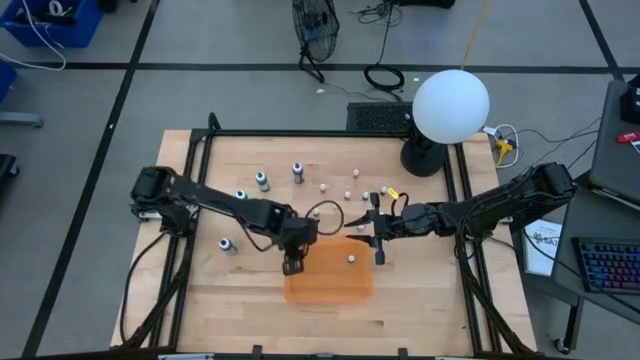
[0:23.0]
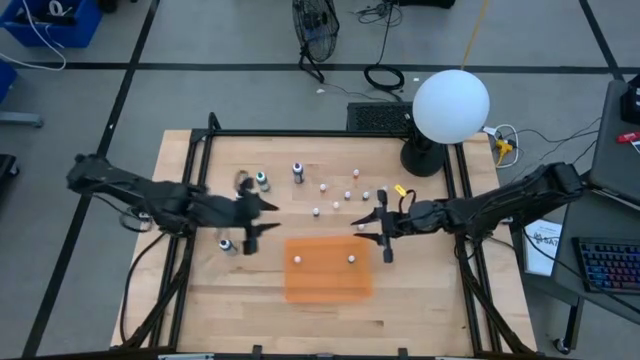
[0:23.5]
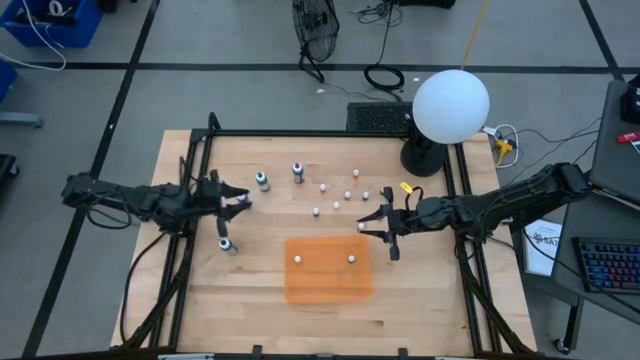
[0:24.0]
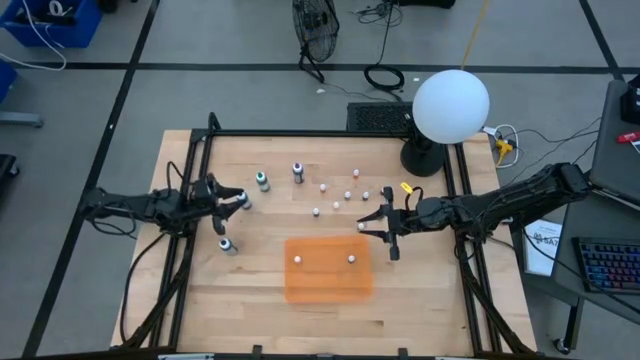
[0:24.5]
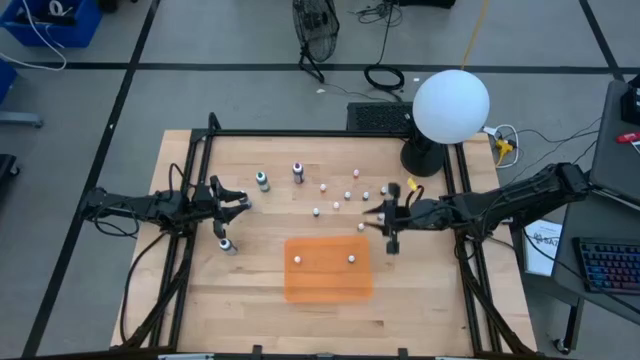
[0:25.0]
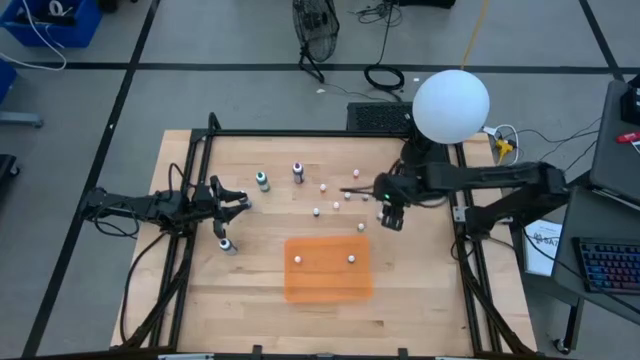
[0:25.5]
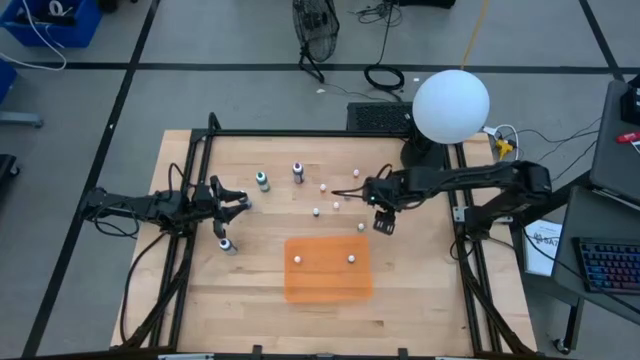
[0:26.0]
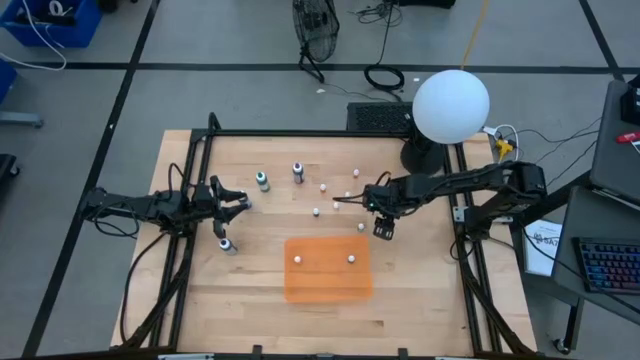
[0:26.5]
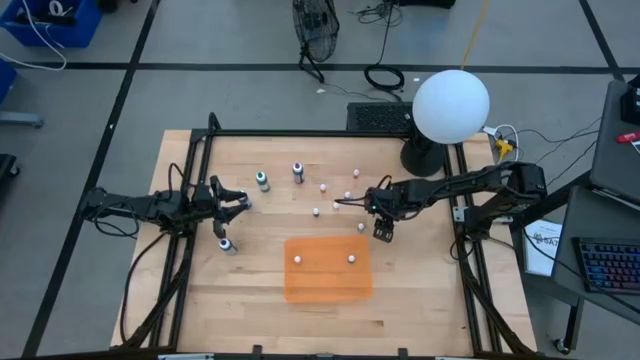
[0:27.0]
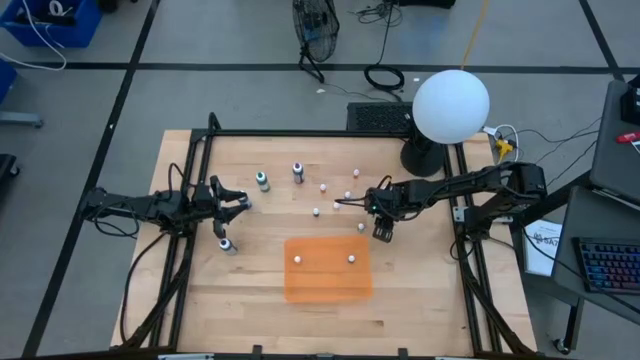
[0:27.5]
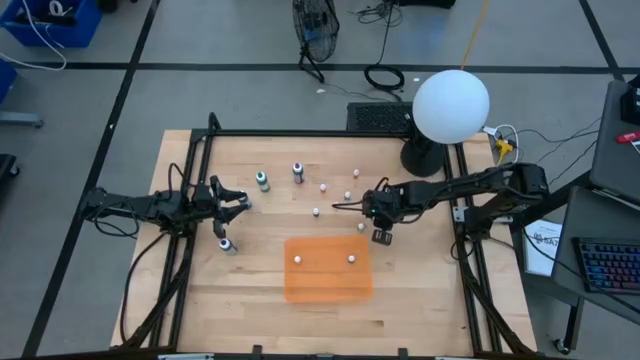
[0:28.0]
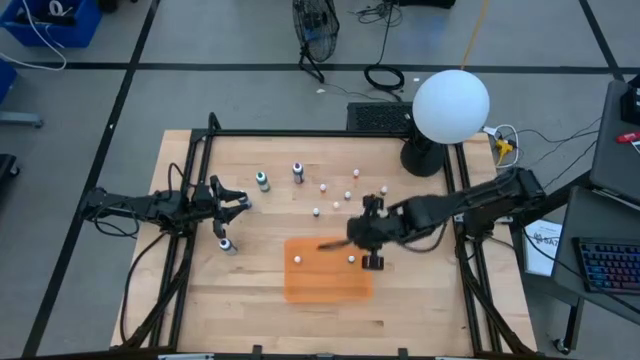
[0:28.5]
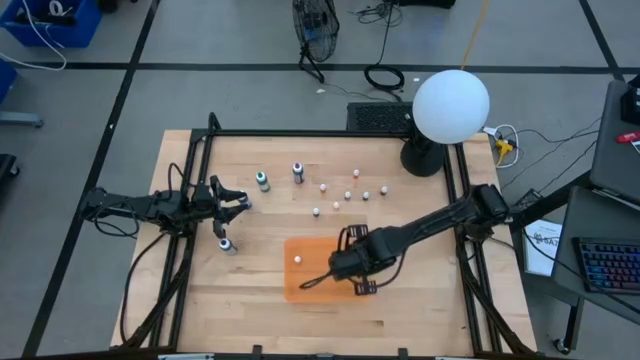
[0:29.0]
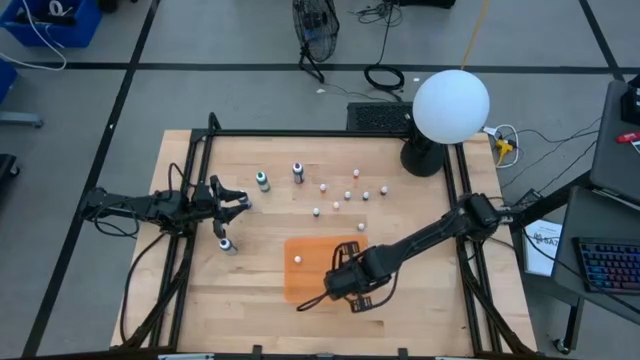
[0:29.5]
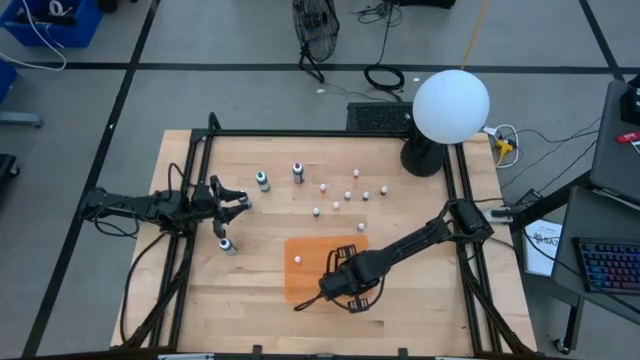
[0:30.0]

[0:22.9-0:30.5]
Task: Pick & Place food coloring
Put the small black food coloring bottle into the orange bin

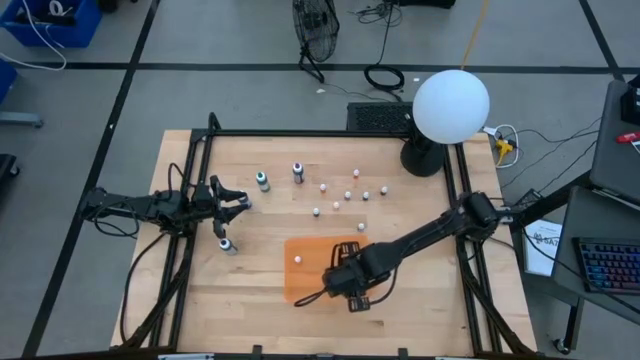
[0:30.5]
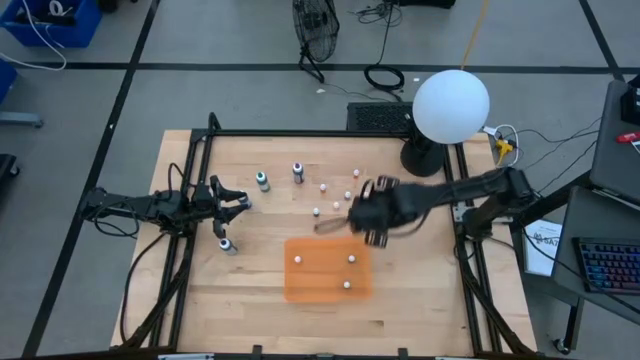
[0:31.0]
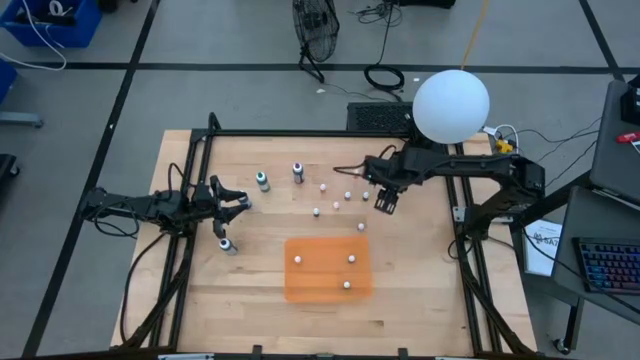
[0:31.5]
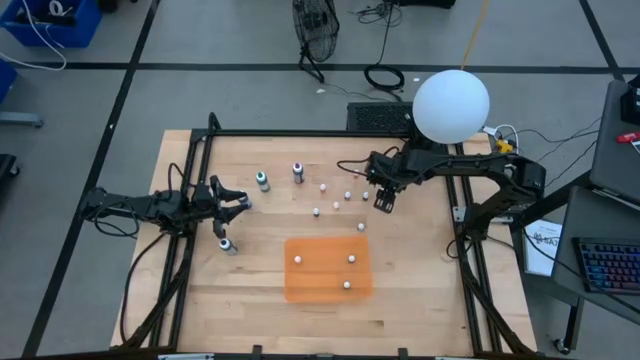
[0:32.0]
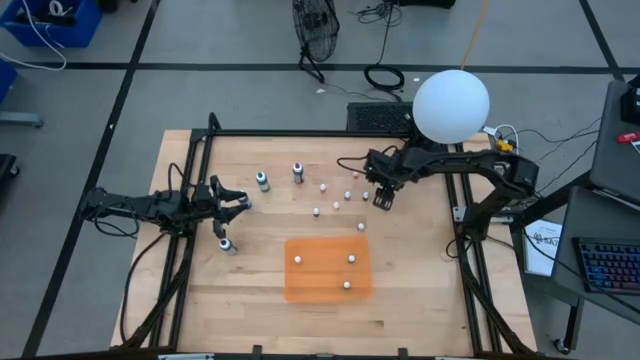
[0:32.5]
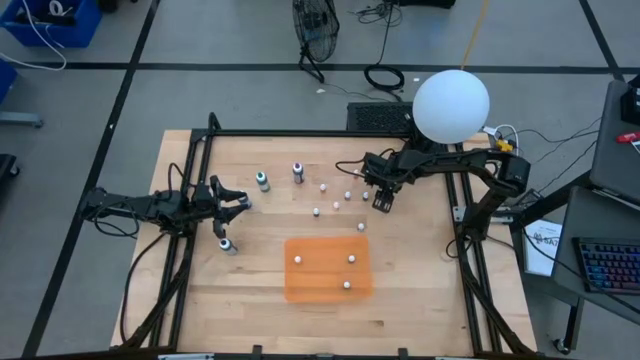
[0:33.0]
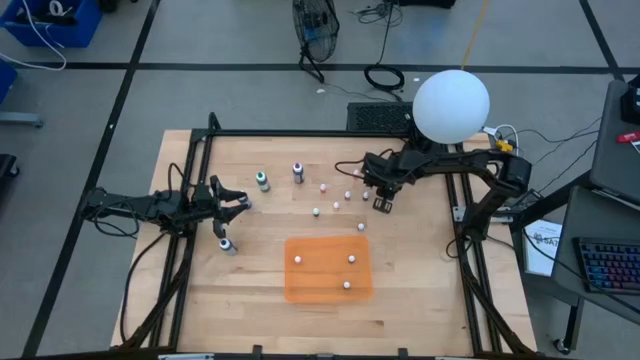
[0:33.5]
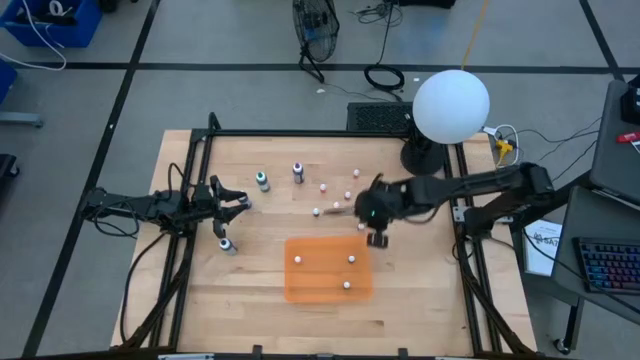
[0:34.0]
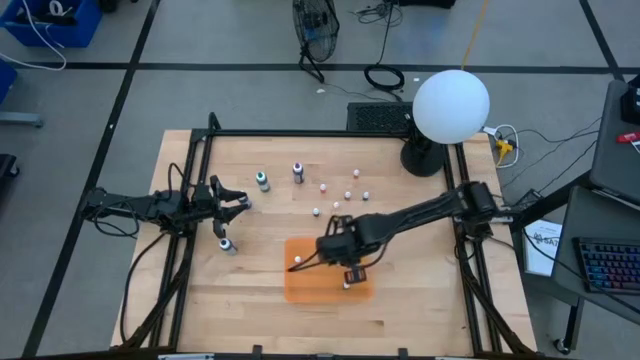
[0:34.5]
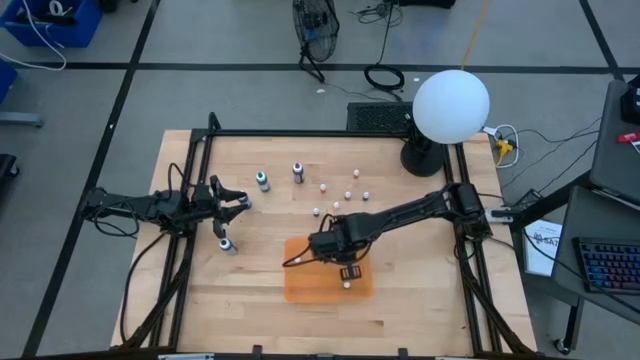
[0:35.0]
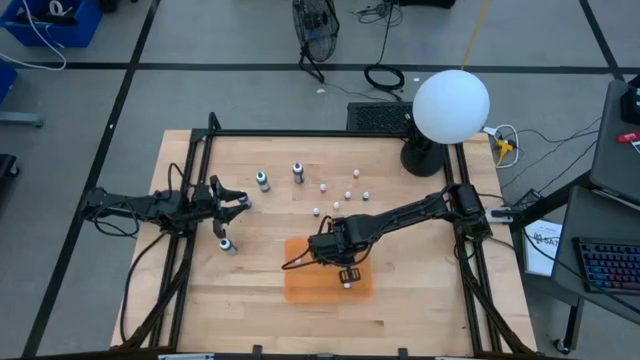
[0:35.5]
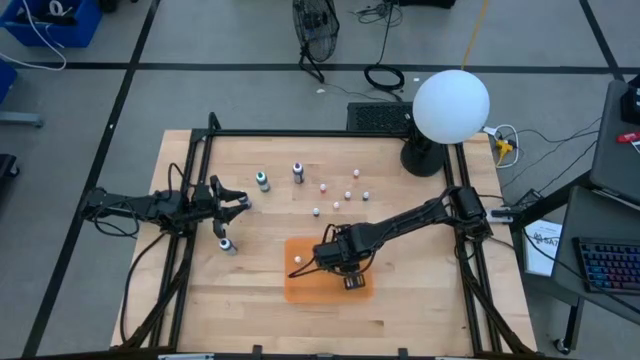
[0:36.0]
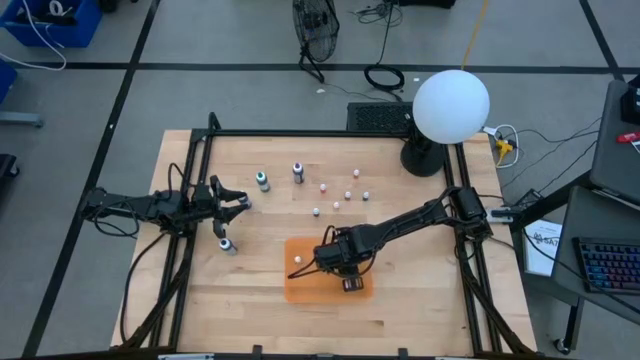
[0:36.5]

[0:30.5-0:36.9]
Put the small black food coloring bottle into the orange bin

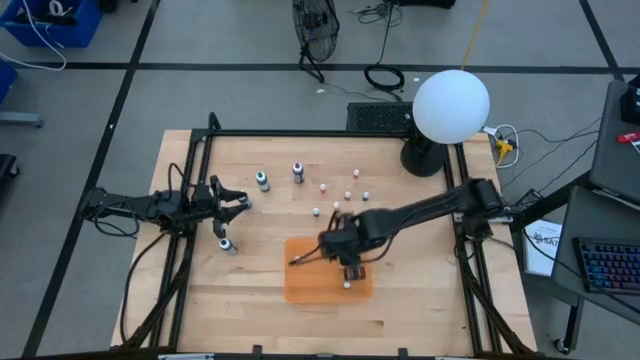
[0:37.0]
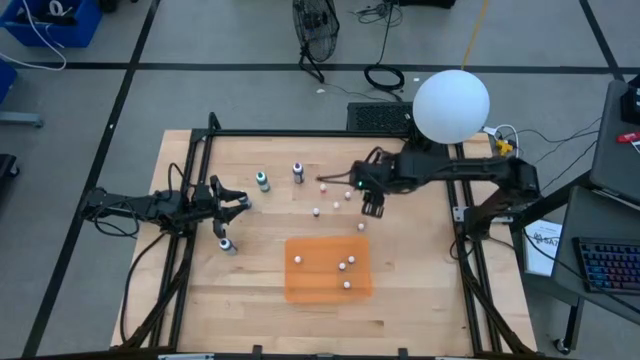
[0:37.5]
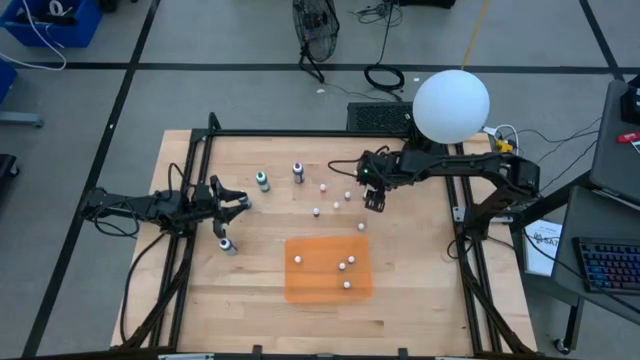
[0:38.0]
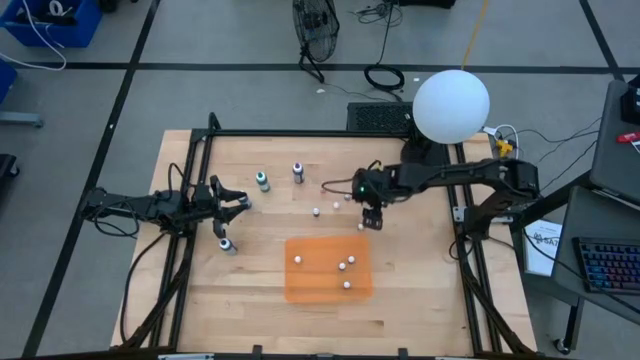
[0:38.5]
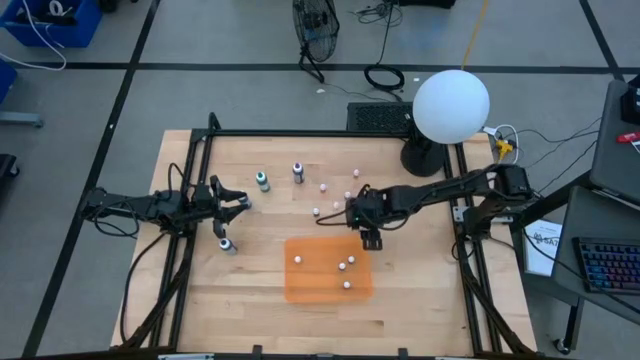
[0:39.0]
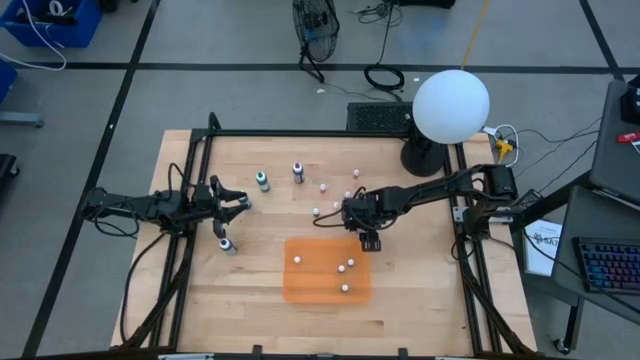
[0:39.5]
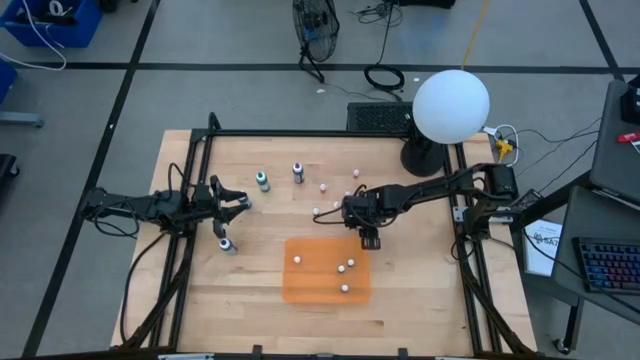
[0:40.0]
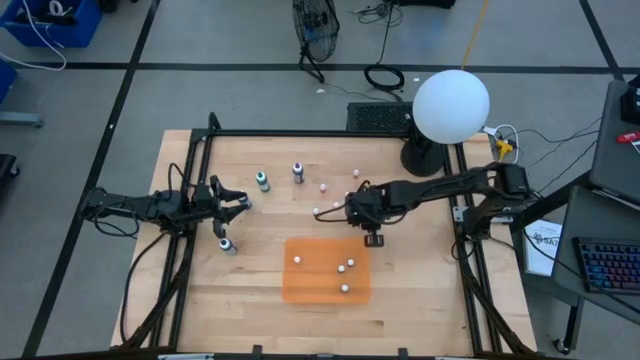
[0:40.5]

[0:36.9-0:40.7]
Put the small violet food coloring bottle into the orange bin

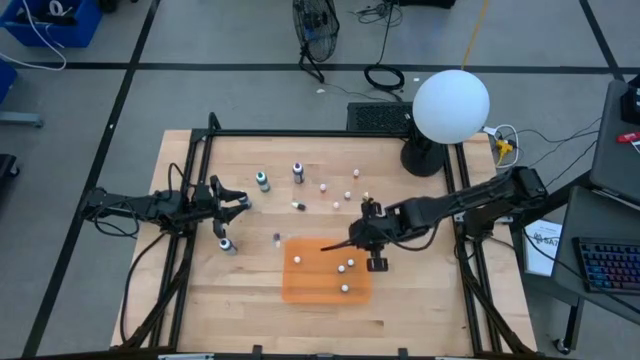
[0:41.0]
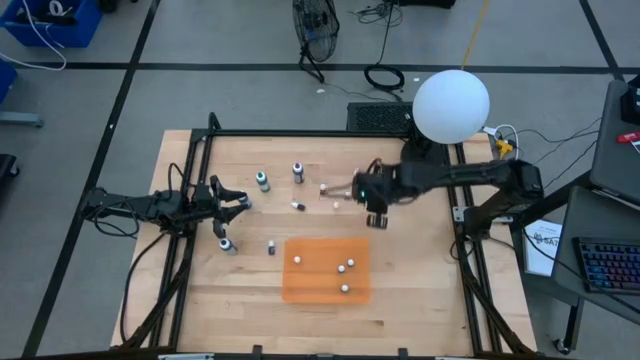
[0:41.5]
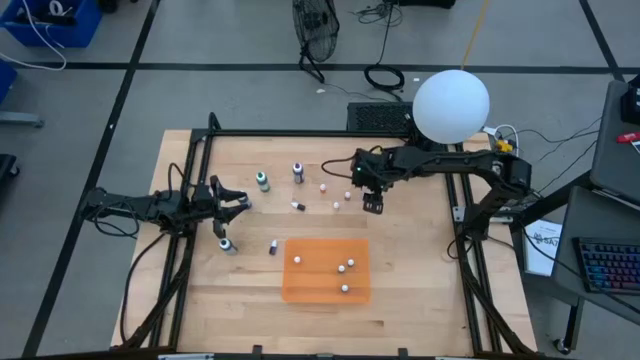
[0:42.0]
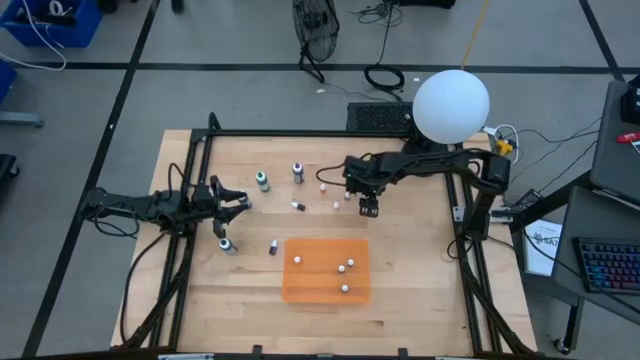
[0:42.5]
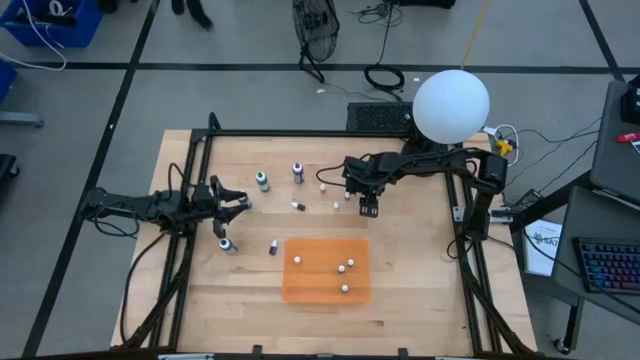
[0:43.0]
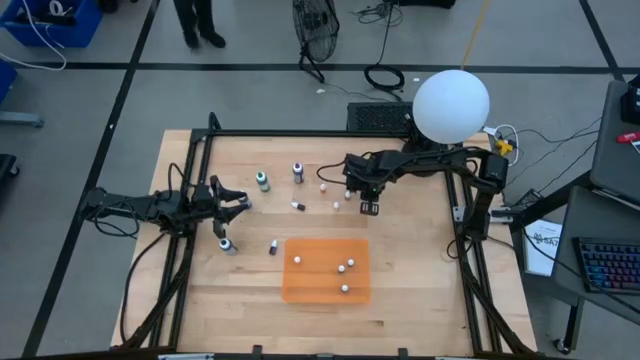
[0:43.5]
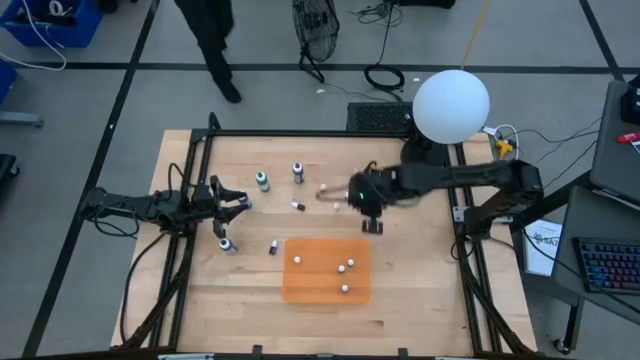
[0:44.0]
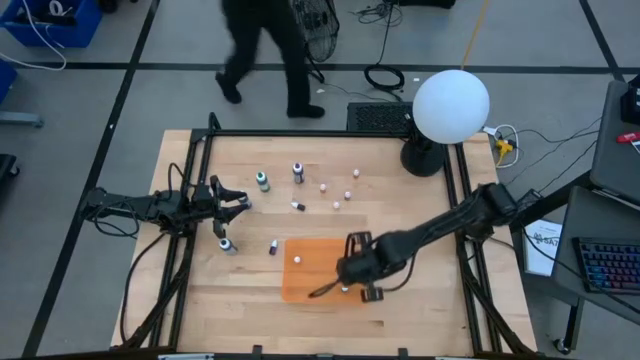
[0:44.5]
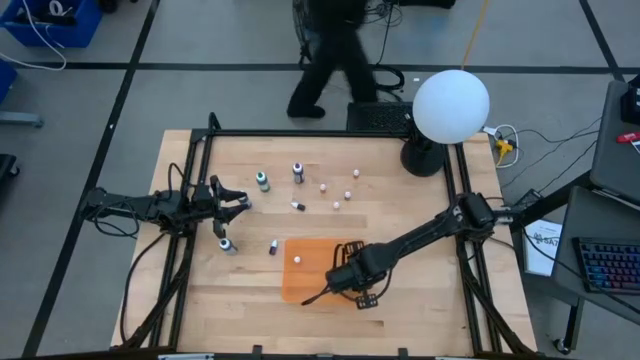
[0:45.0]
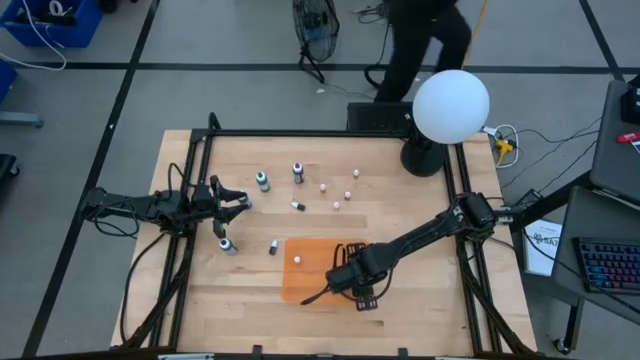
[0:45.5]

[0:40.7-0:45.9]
Put the small black food coloring bottle into the orange bin
